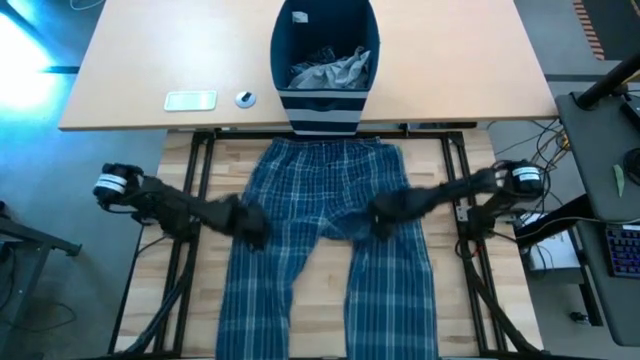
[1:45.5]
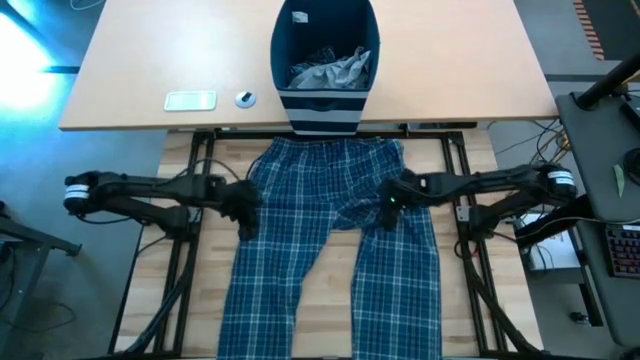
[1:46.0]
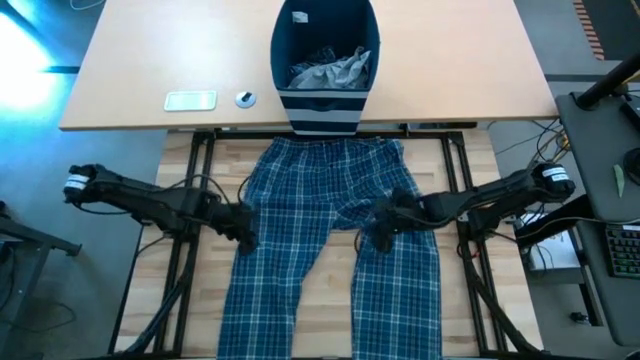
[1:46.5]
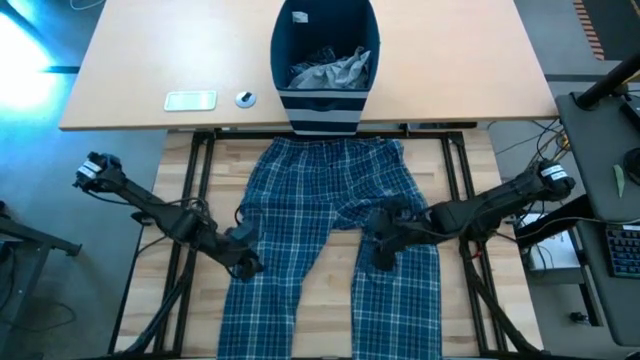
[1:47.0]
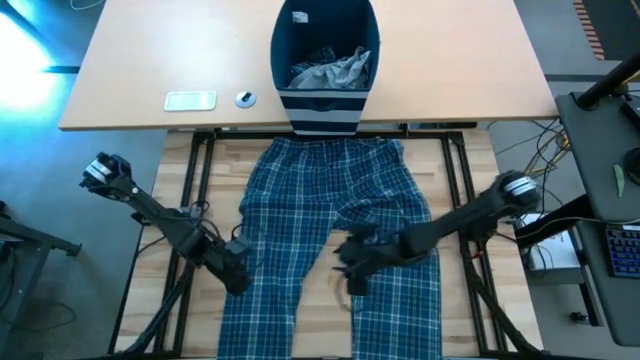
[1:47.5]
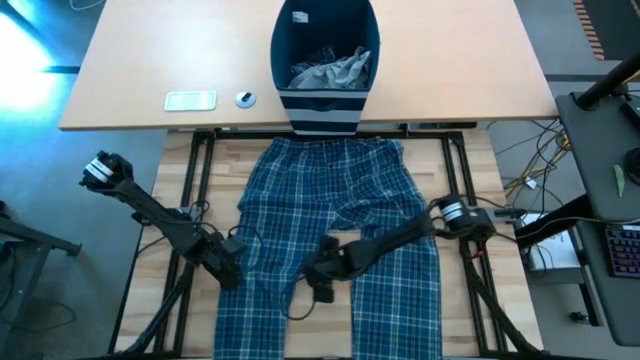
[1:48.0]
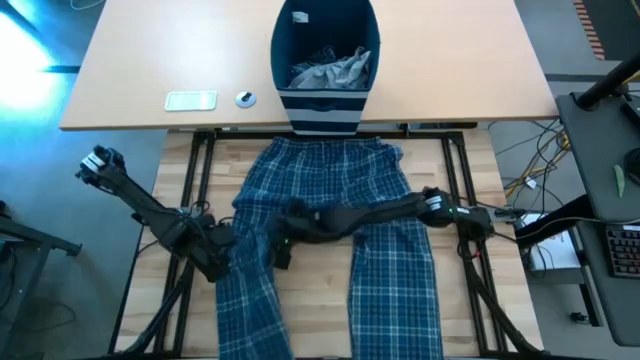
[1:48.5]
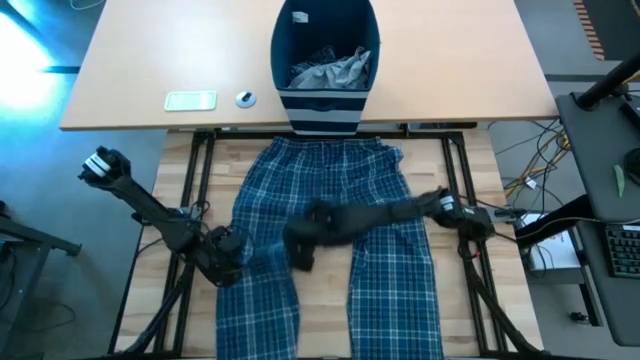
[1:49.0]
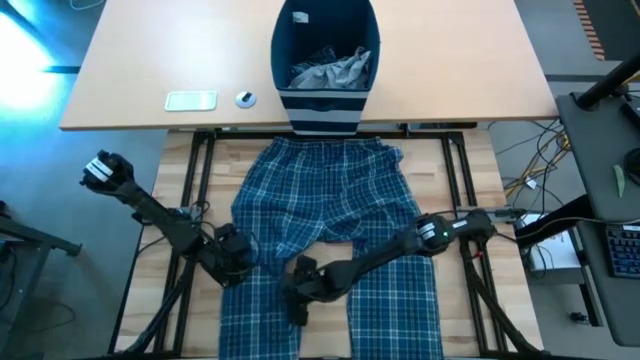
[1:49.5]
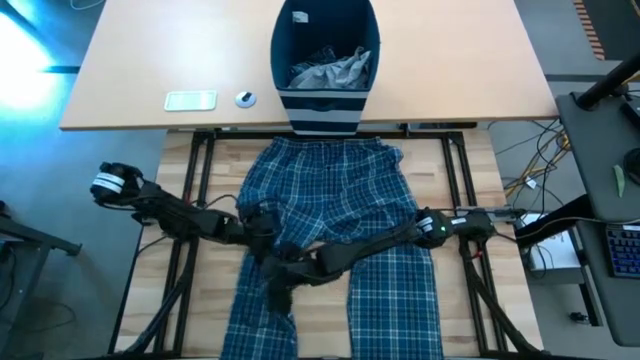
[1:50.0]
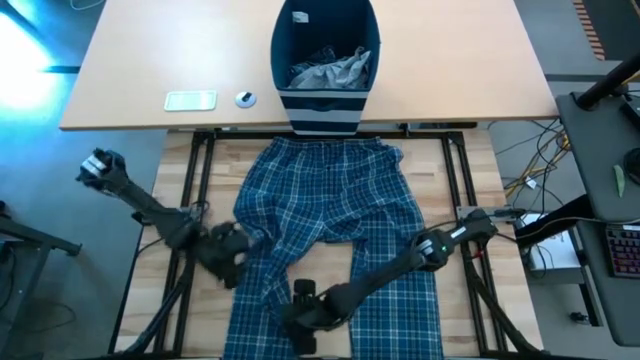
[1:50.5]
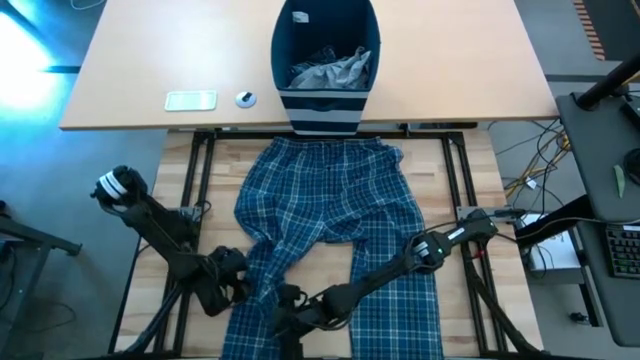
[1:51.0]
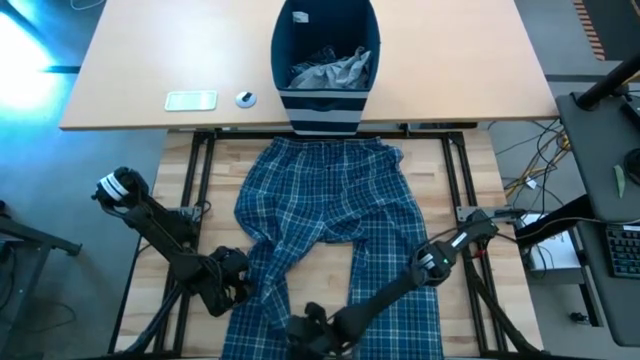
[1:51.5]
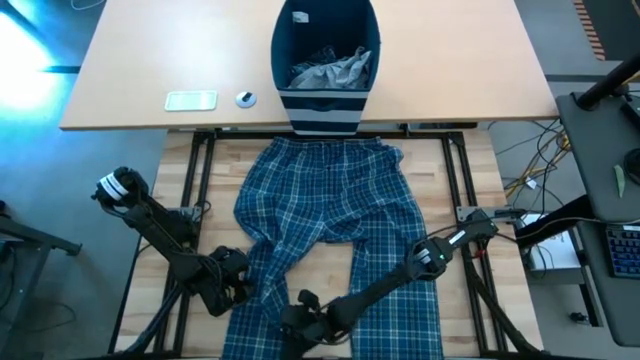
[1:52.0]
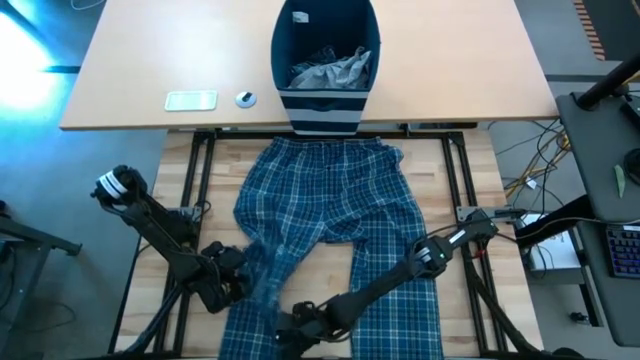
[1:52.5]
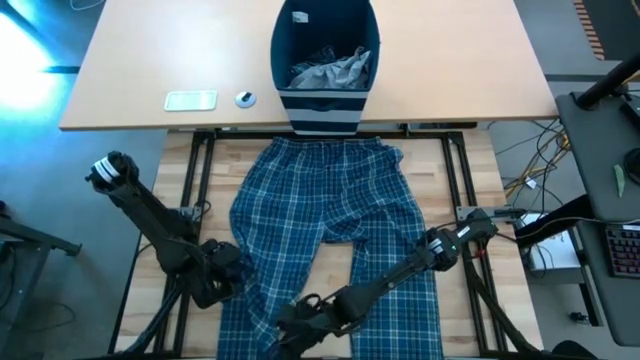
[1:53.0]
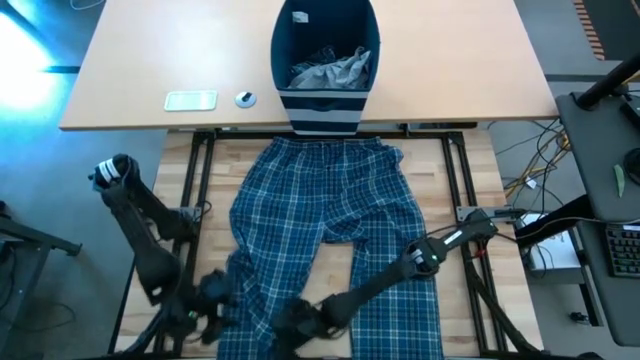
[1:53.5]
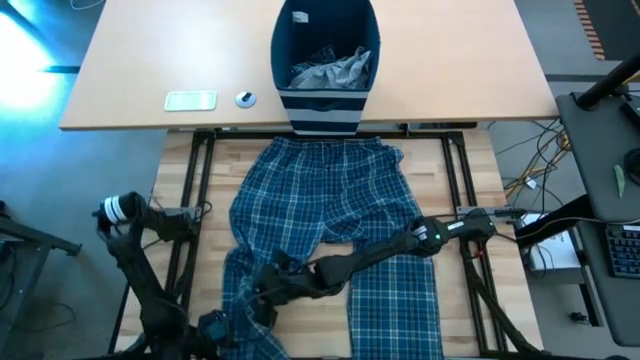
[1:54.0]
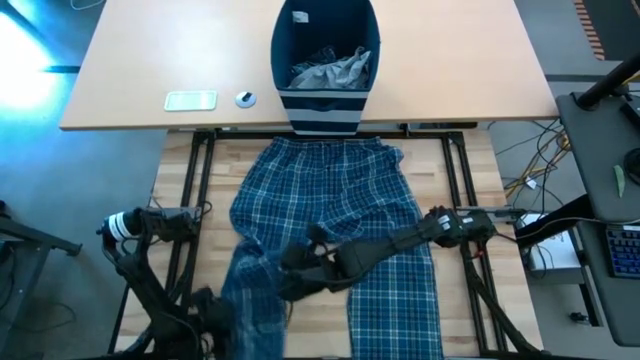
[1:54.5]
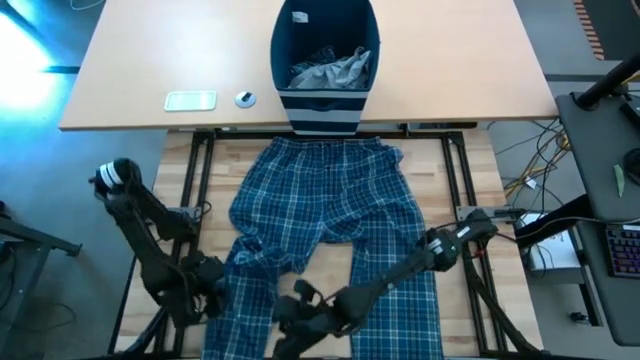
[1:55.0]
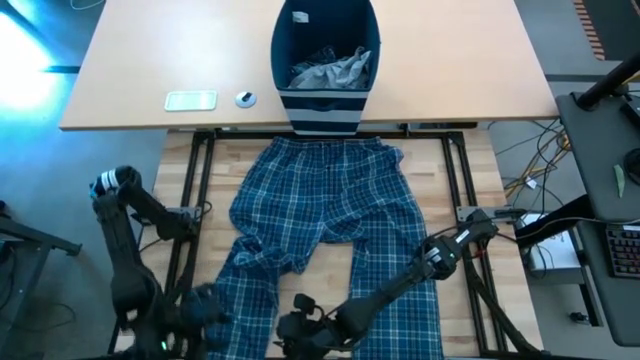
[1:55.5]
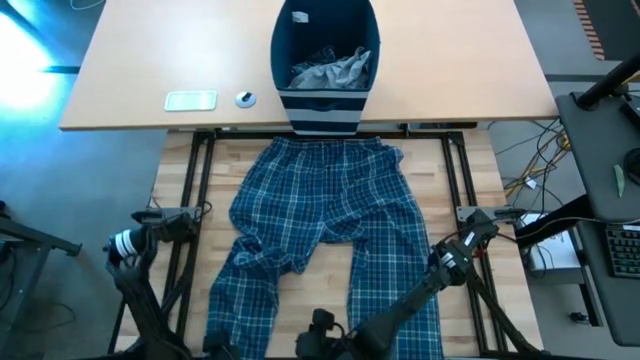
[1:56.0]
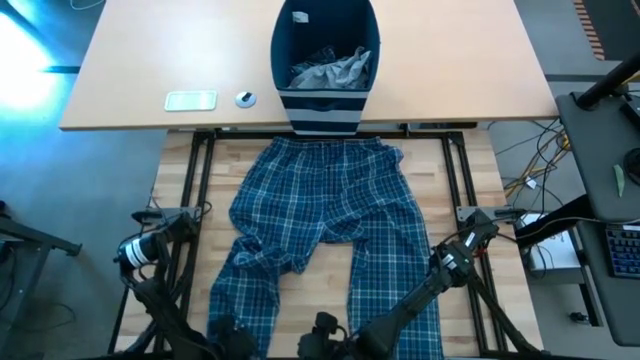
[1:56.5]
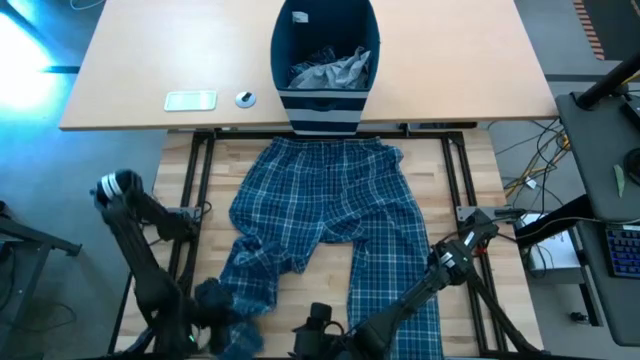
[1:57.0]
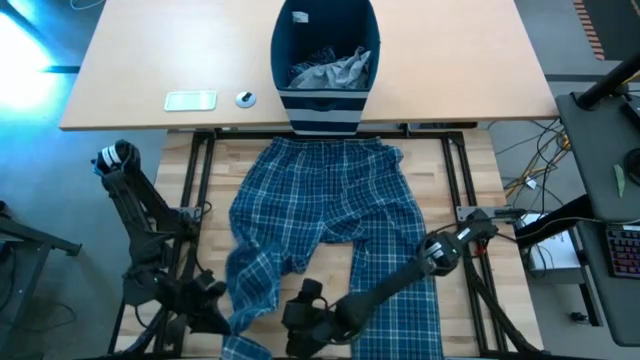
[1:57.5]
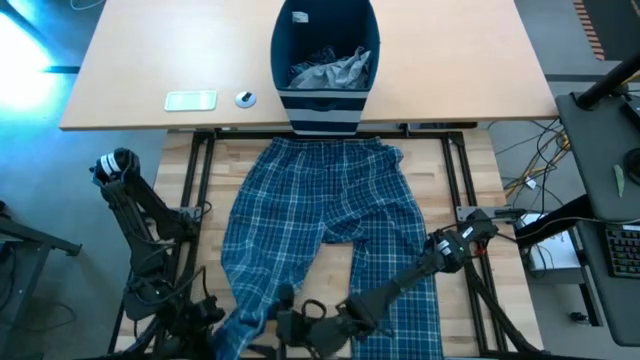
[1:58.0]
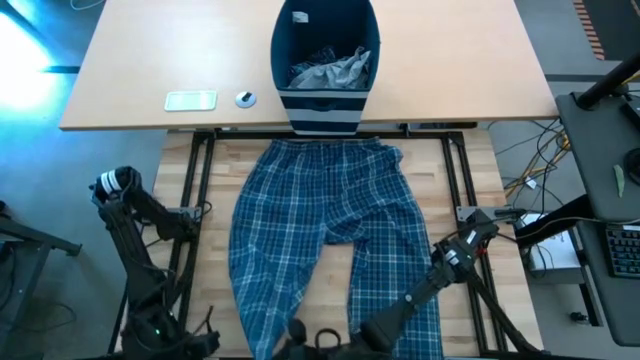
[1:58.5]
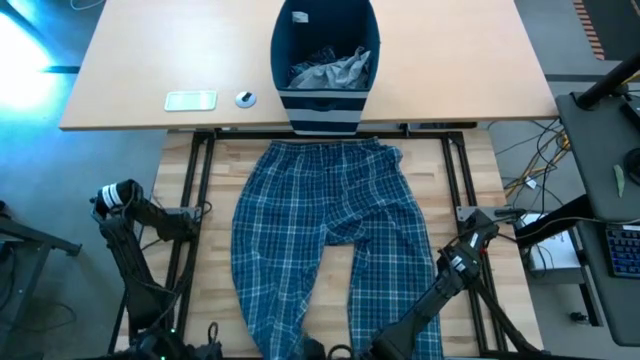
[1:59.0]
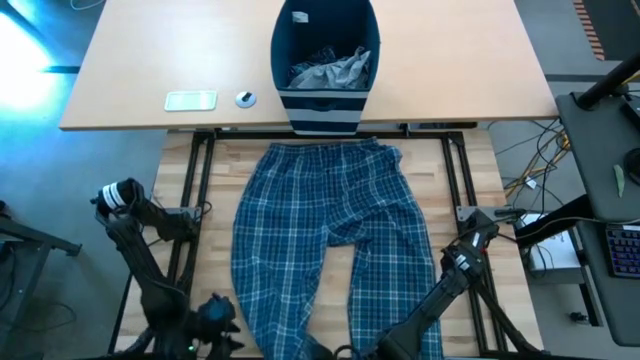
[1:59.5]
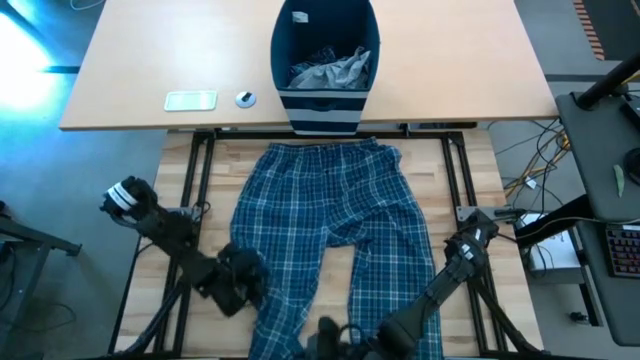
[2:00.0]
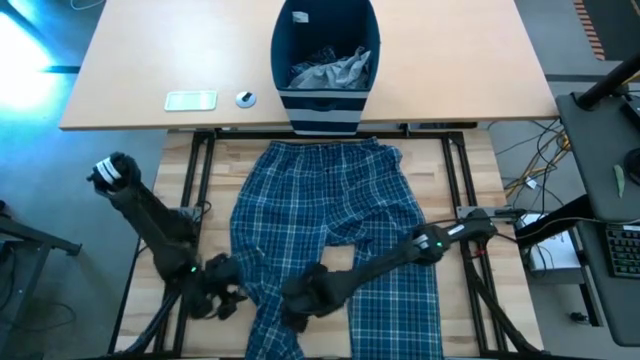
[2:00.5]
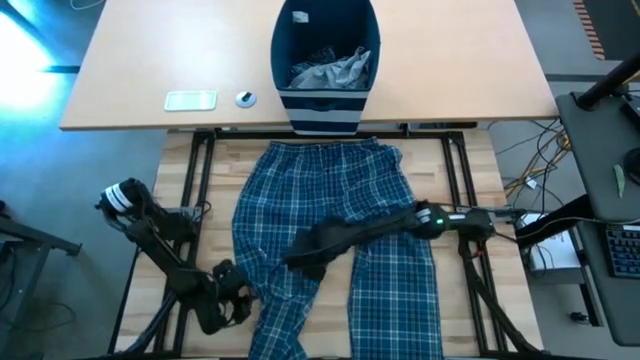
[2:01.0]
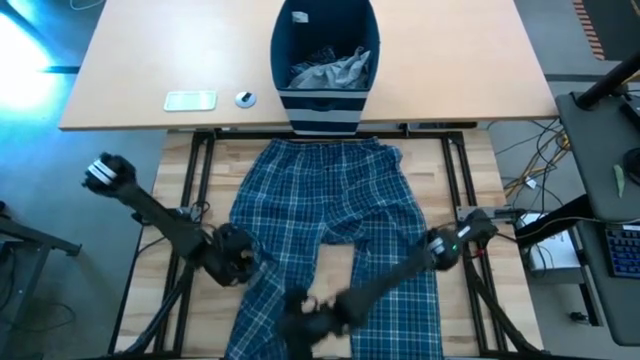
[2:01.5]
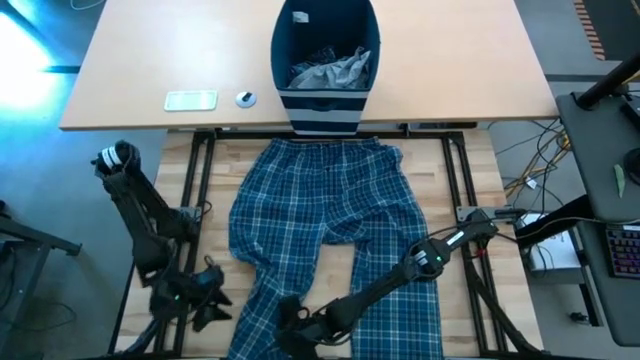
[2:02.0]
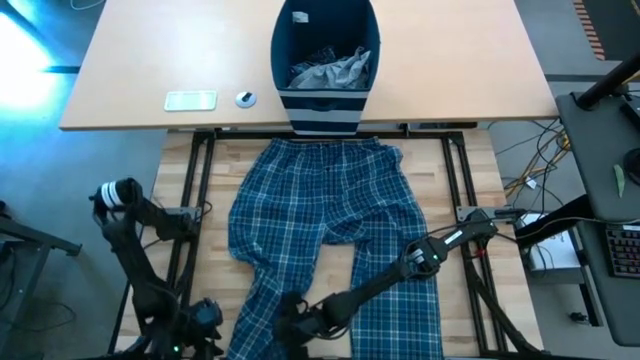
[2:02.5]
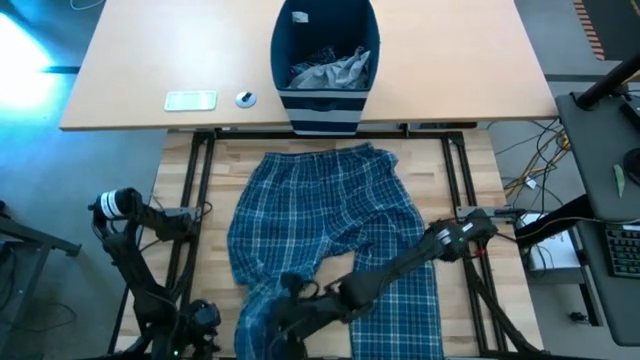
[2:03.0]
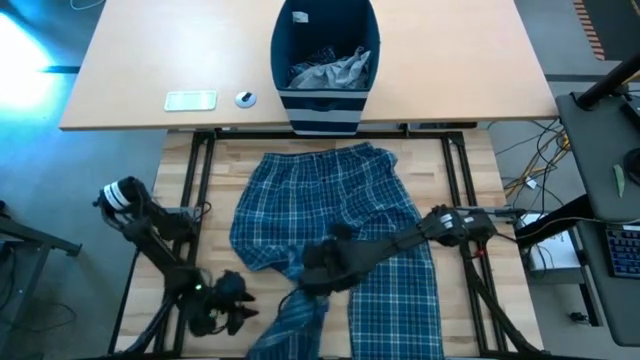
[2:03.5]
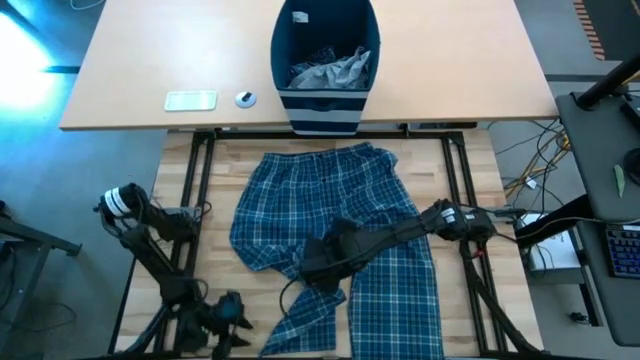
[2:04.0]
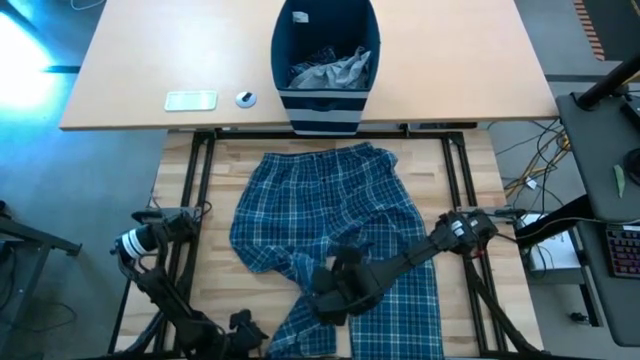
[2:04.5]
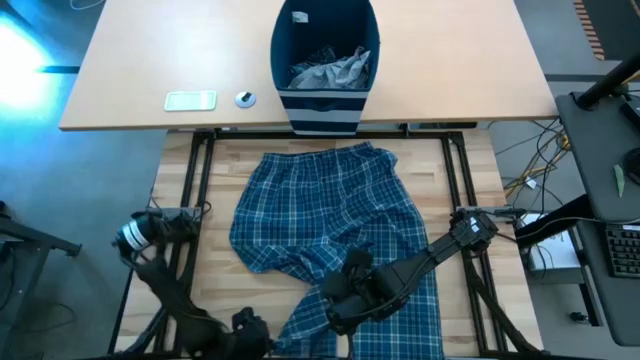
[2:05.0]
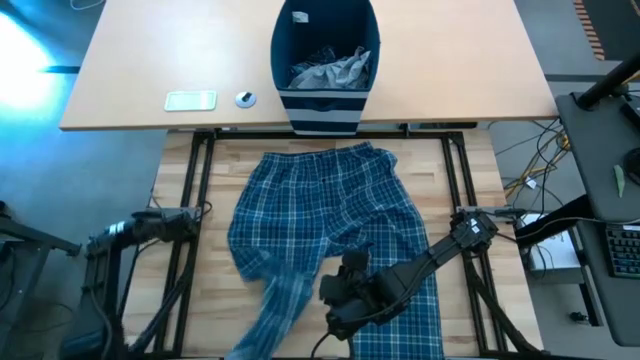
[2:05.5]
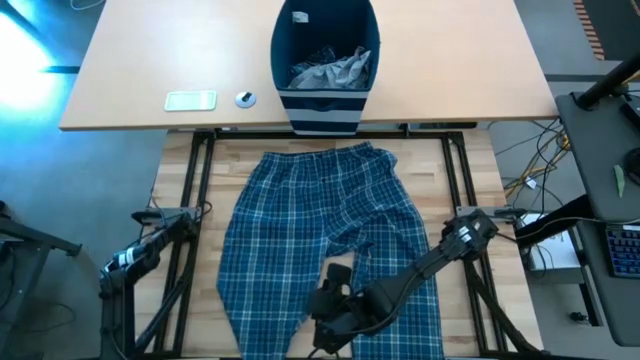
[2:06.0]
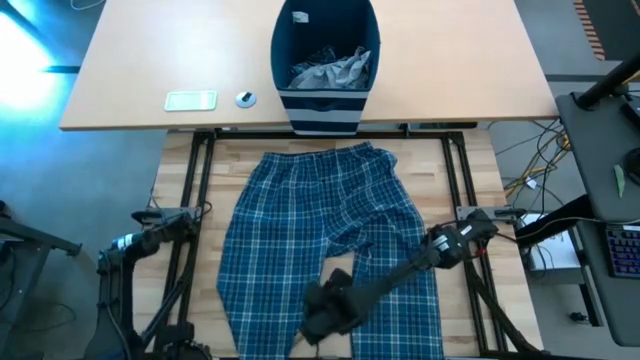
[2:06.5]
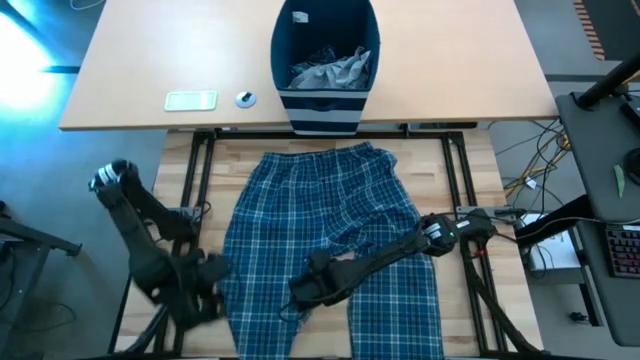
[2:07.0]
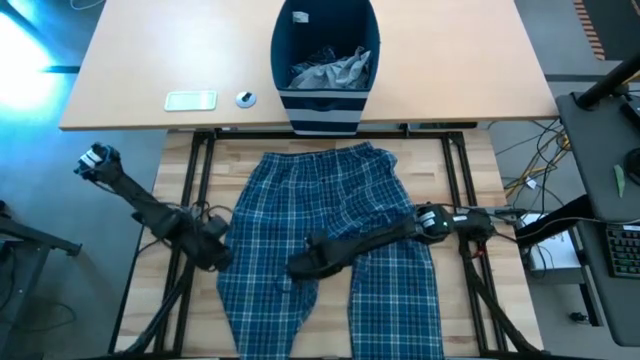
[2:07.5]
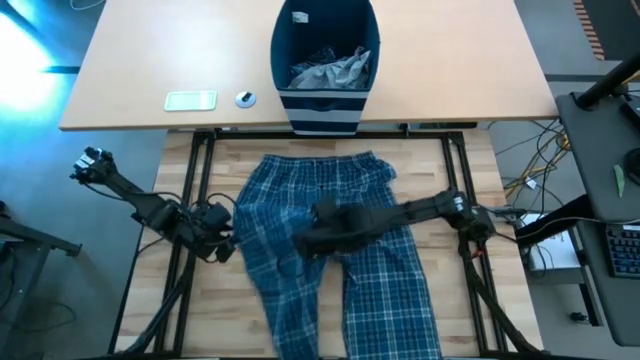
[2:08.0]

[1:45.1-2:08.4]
Task: Fold Laundry from Bin
Fold the blue patterned pants
